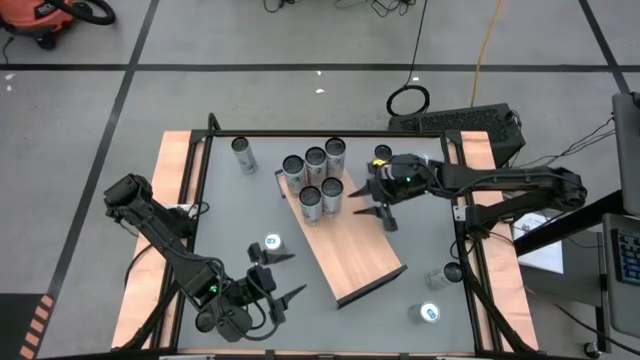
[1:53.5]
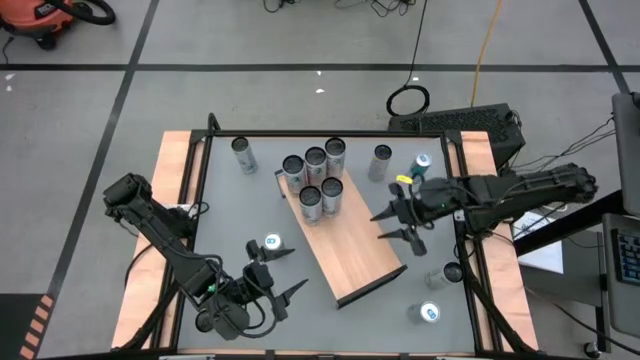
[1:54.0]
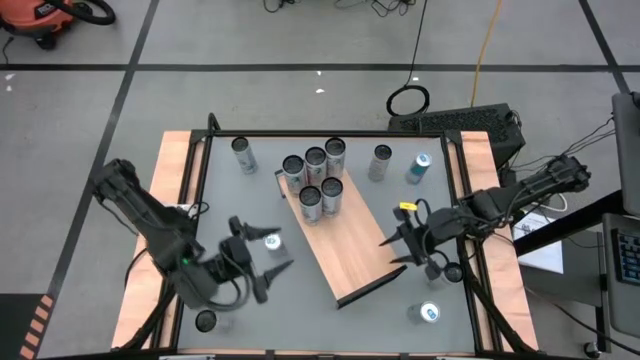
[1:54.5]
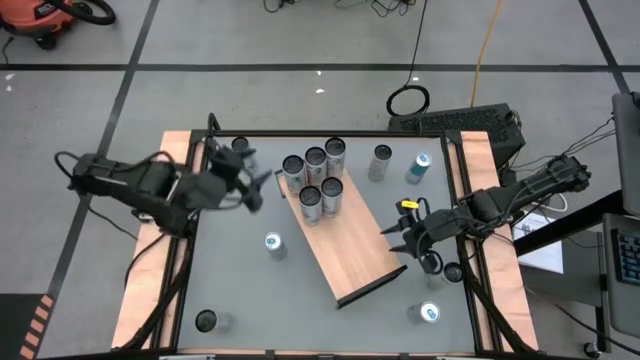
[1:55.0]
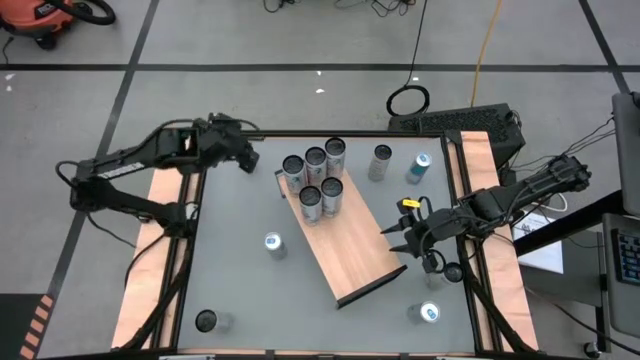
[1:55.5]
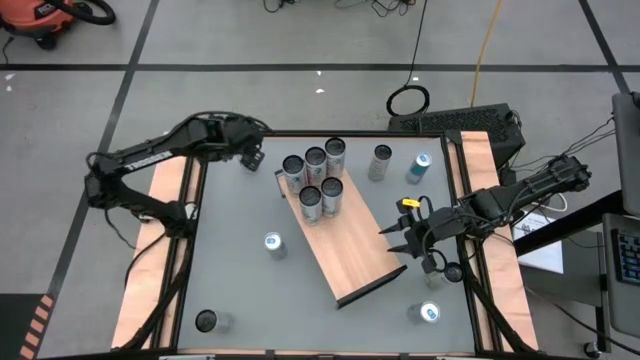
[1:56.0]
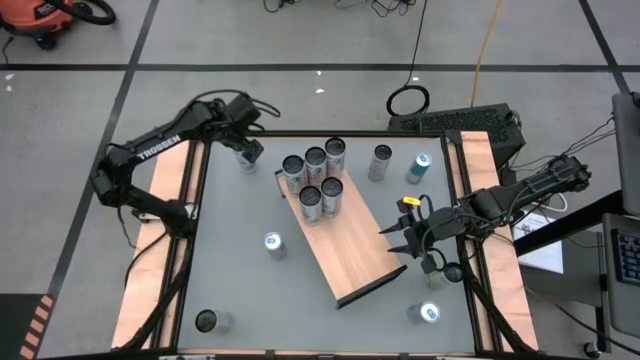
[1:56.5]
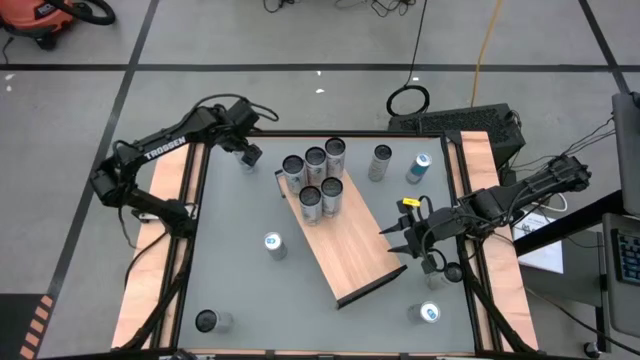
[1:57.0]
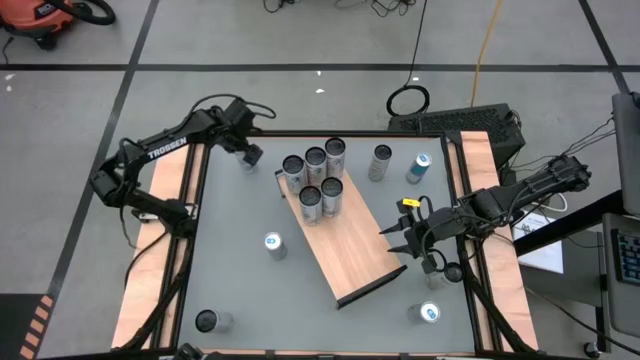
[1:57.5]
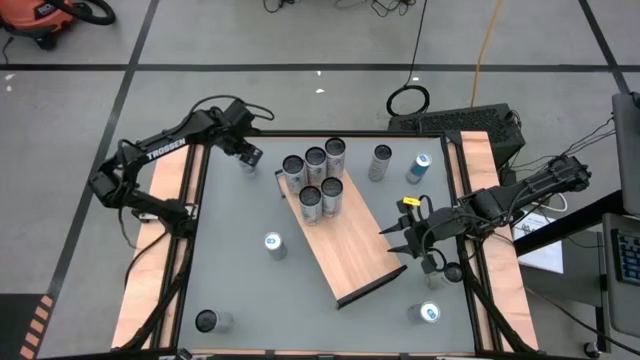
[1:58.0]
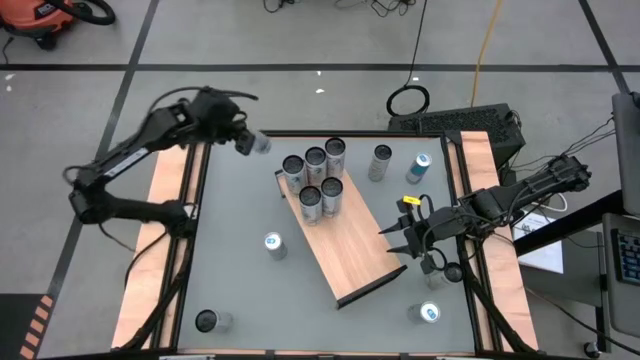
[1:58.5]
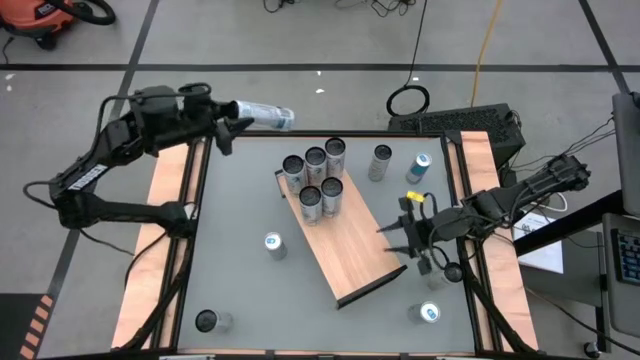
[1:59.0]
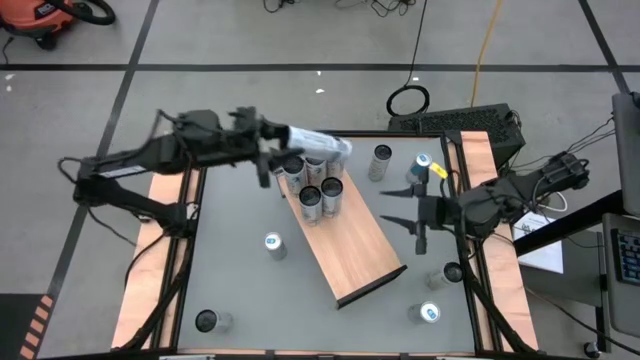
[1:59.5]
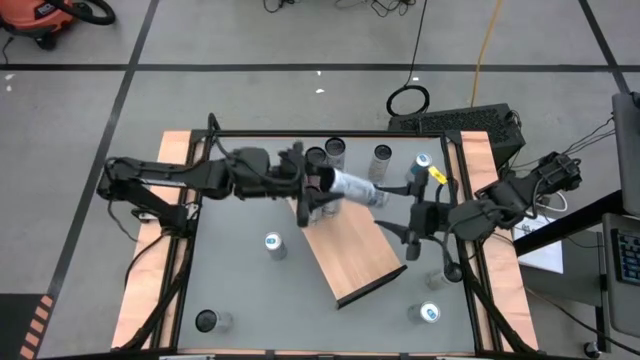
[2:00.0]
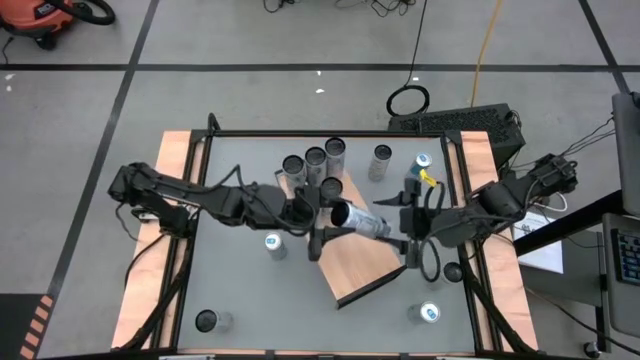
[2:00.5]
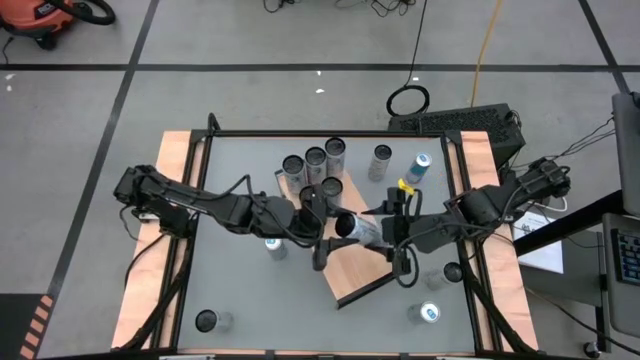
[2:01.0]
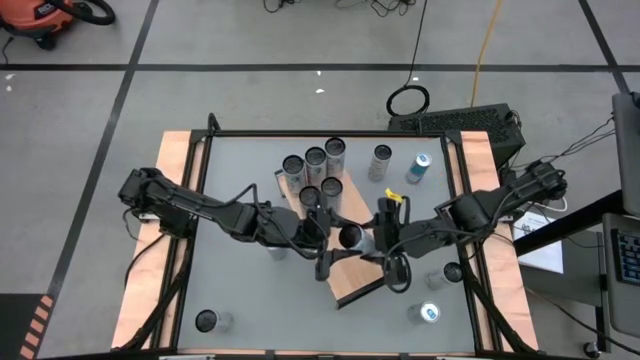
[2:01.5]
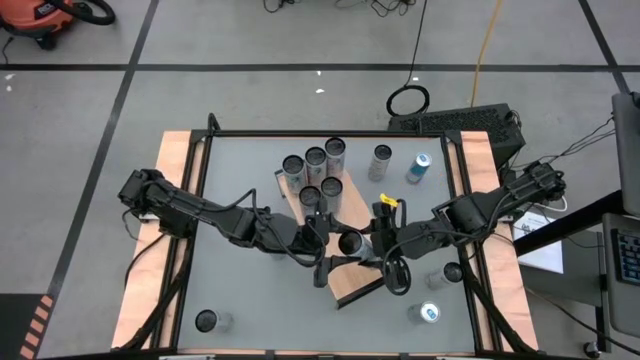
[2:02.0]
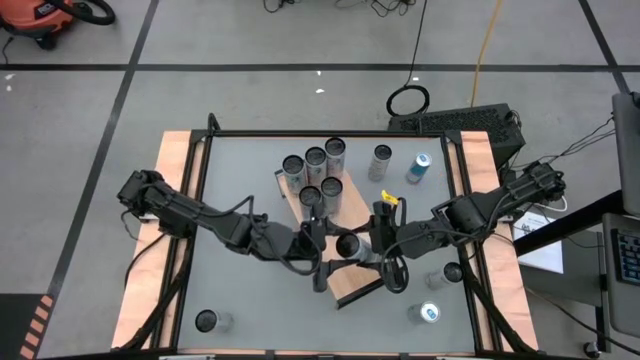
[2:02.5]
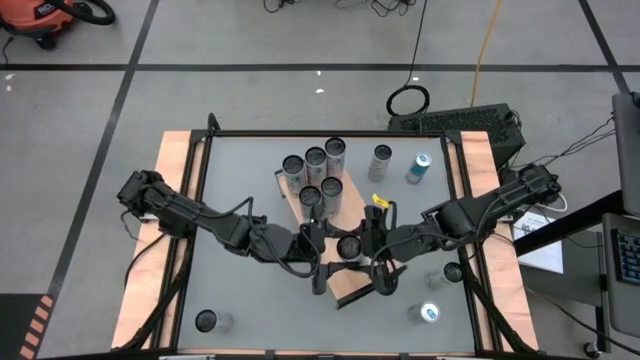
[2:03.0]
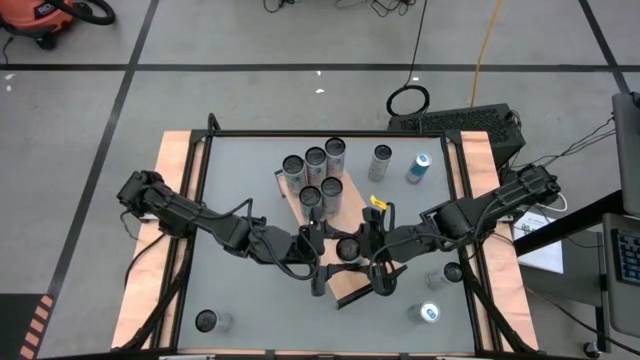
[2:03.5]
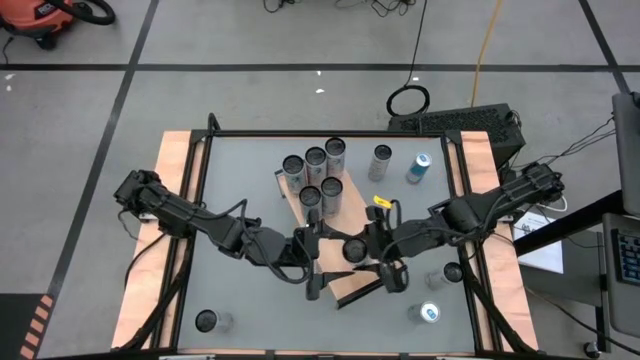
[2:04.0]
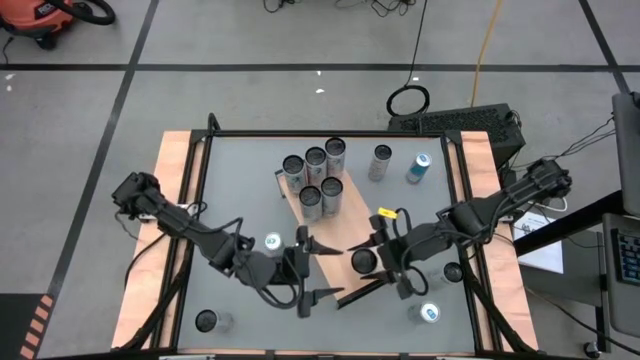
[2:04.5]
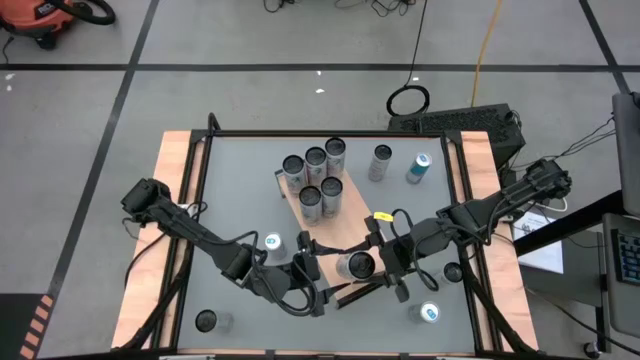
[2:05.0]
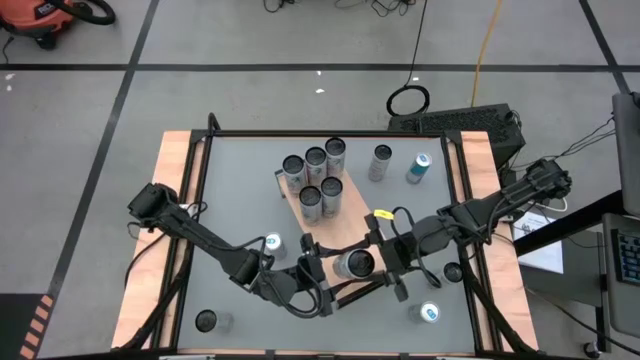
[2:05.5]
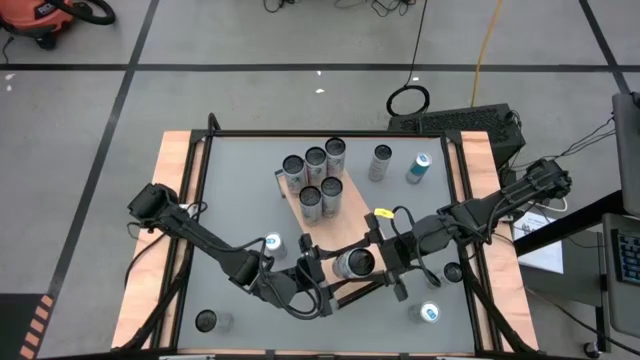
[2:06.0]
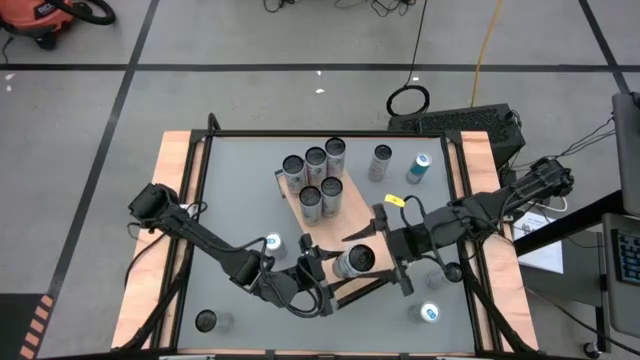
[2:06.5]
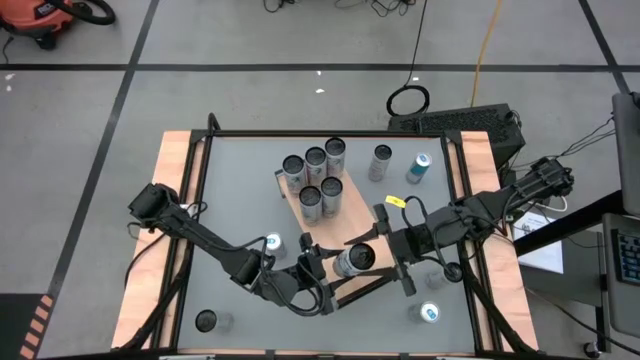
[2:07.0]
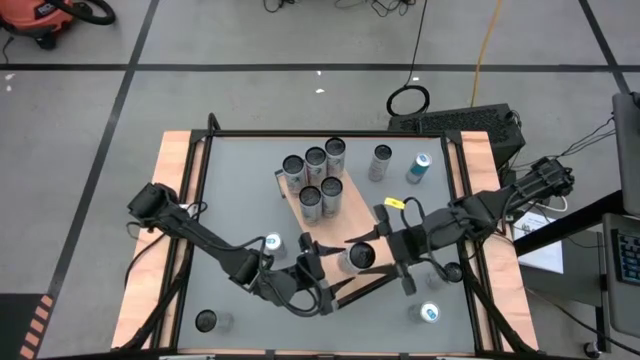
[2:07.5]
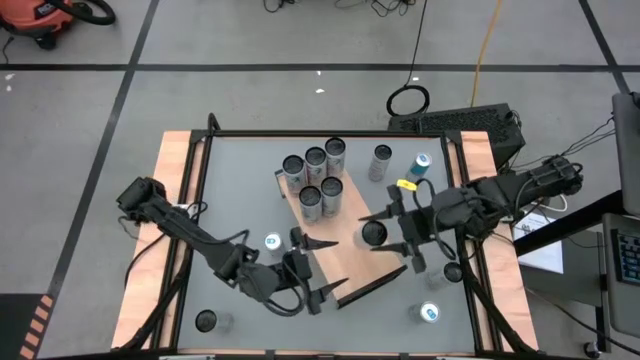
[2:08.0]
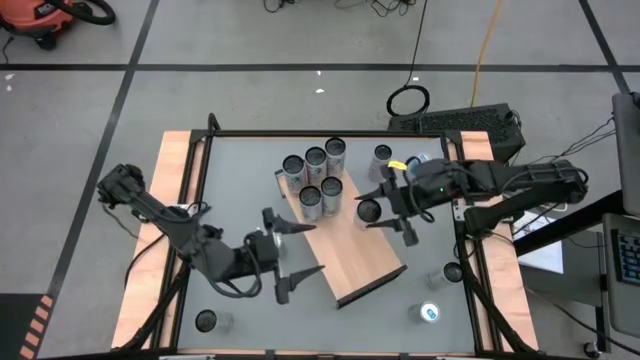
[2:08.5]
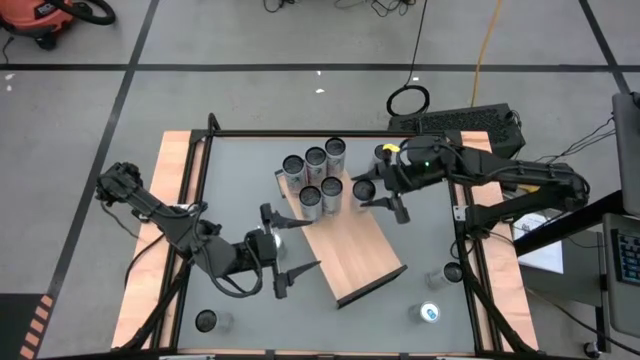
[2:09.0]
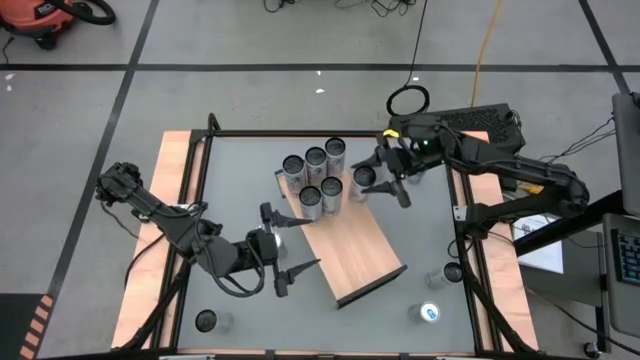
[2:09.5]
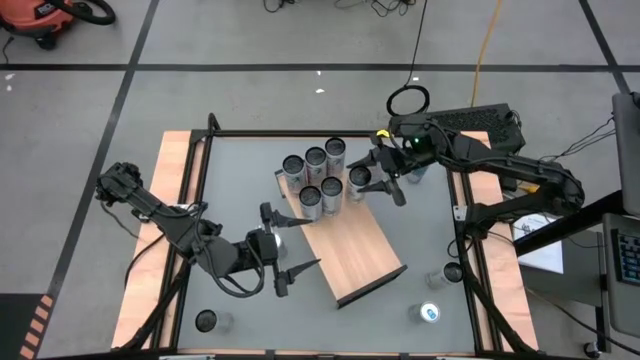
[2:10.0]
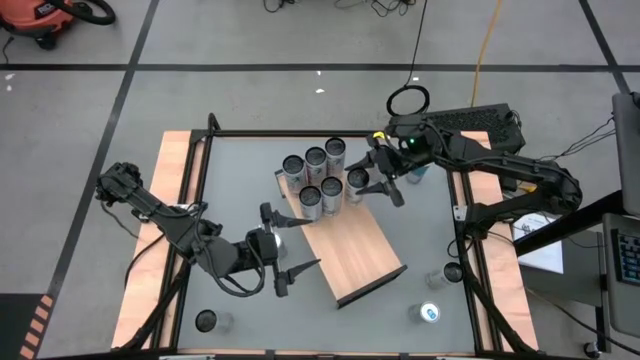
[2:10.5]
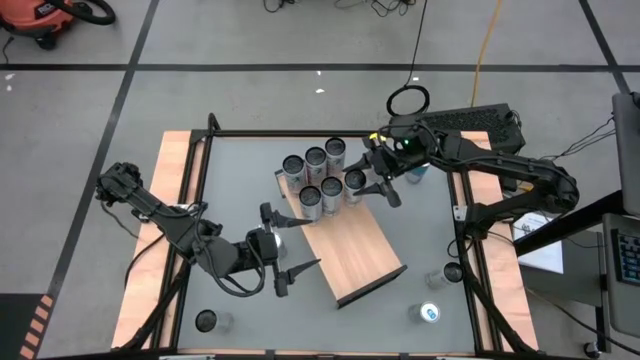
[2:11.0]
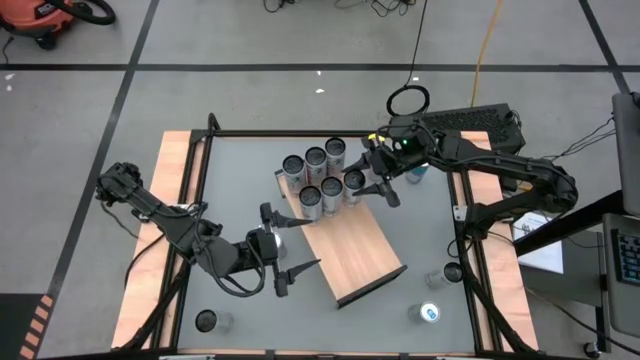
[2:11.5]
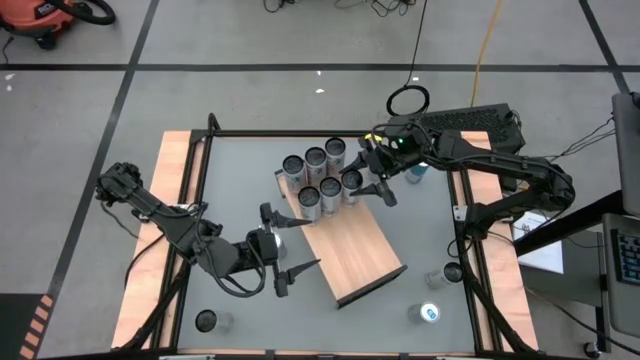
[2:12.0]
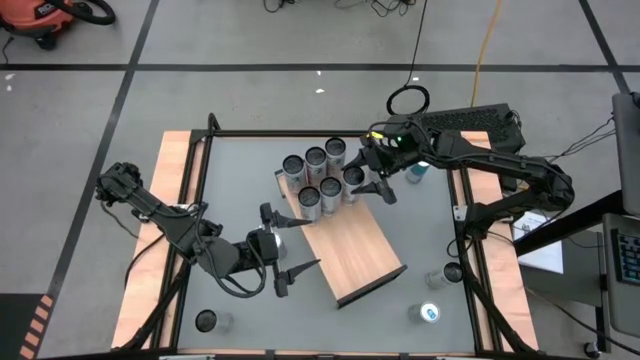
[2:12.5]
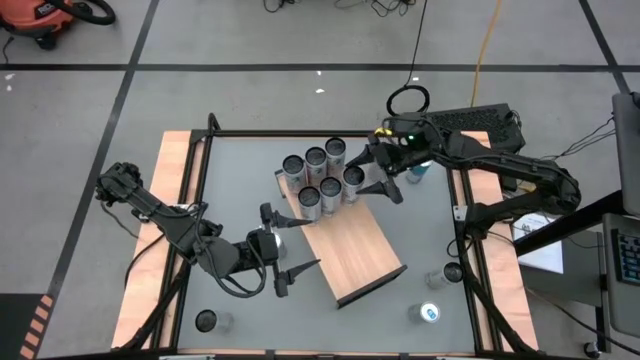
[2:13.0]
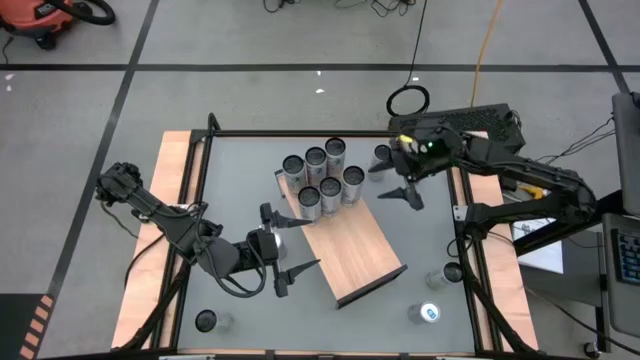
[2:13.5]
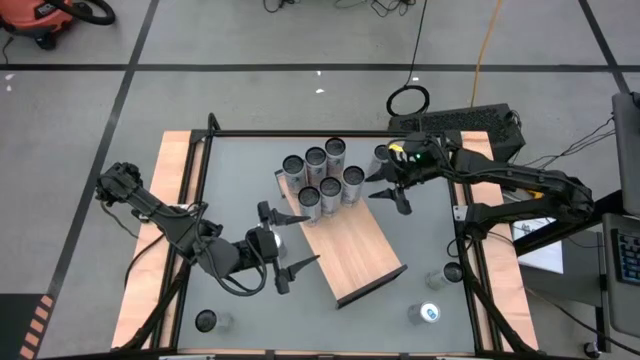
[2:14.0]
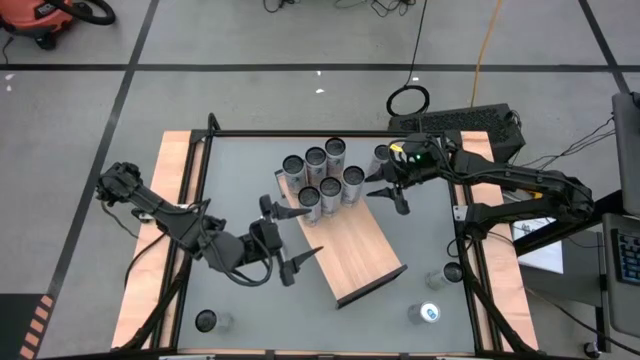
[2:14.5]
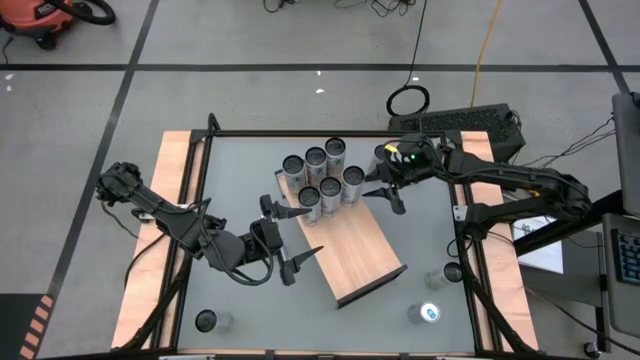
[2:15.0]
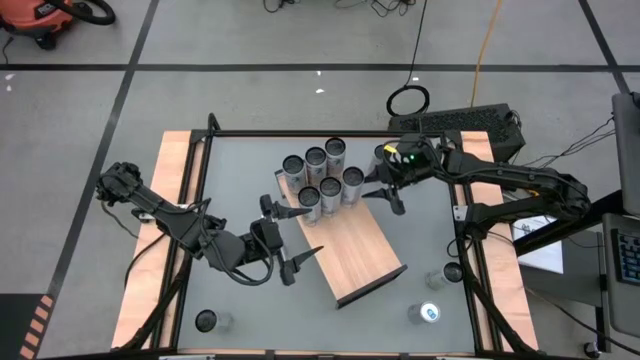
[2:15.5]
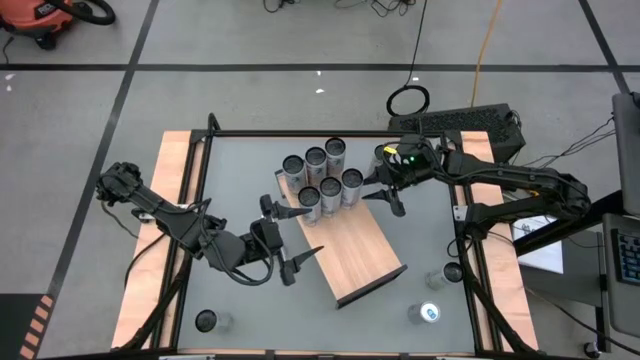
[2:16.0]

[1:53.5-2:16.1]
Task: Place canned beverage on shelf
Put the white-blue soda can on the shelf aligned with the other white-blue soda cans
